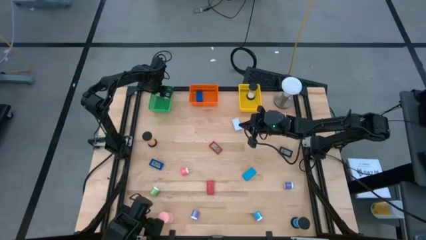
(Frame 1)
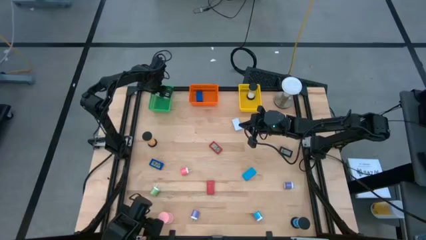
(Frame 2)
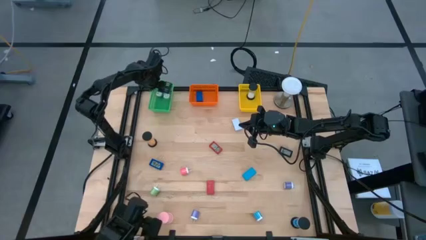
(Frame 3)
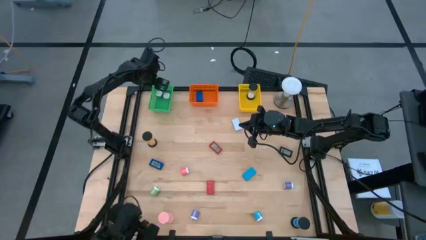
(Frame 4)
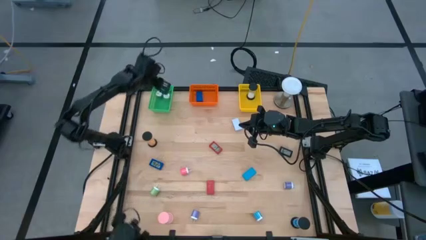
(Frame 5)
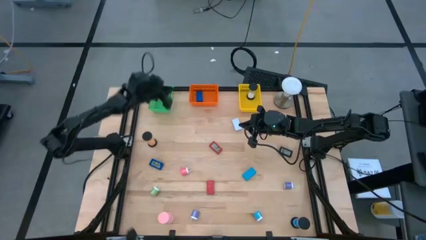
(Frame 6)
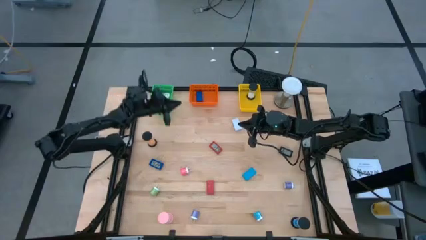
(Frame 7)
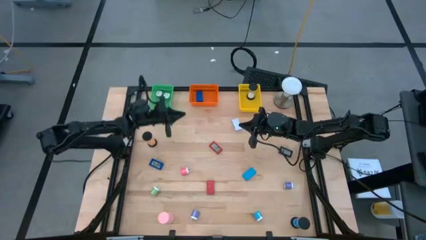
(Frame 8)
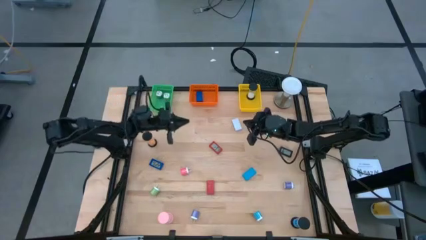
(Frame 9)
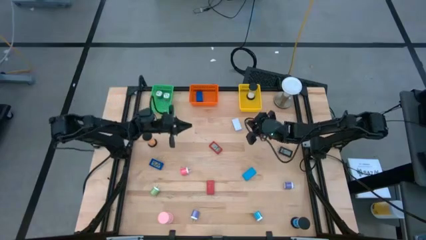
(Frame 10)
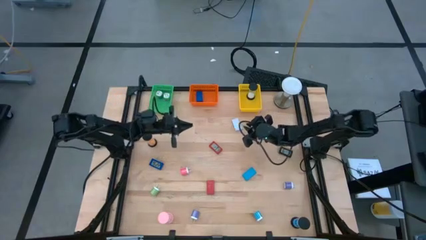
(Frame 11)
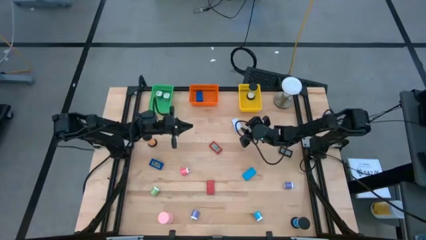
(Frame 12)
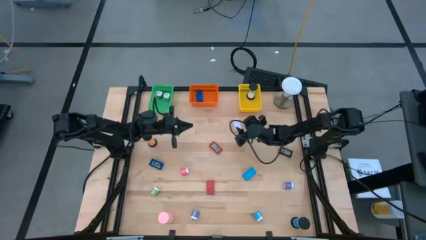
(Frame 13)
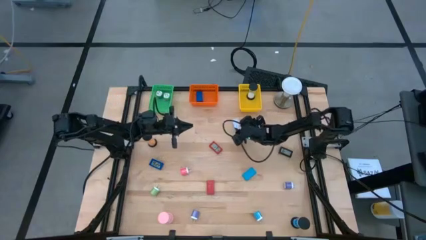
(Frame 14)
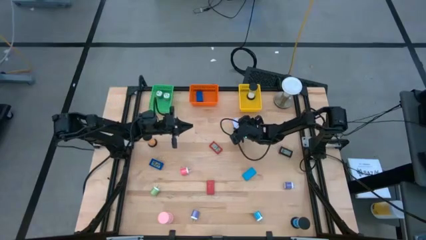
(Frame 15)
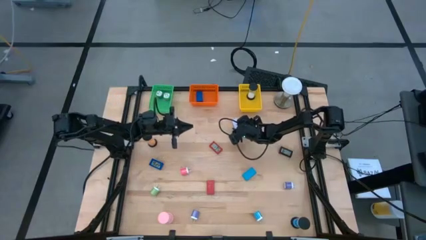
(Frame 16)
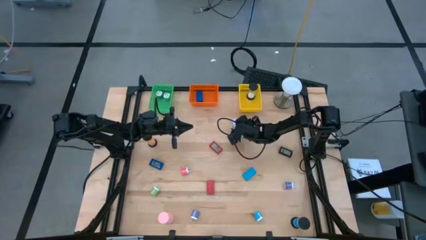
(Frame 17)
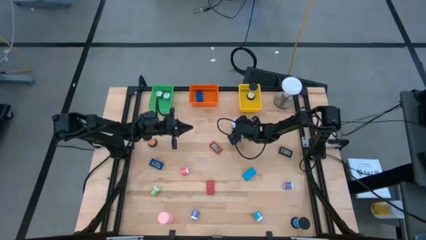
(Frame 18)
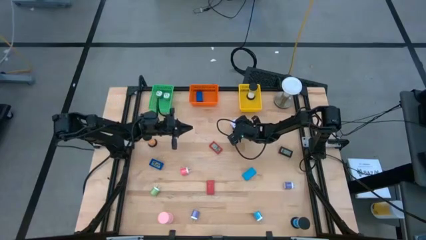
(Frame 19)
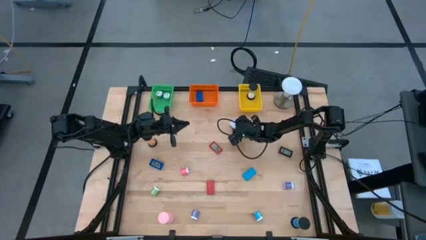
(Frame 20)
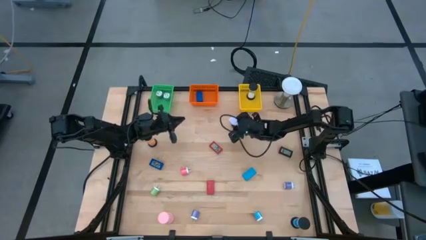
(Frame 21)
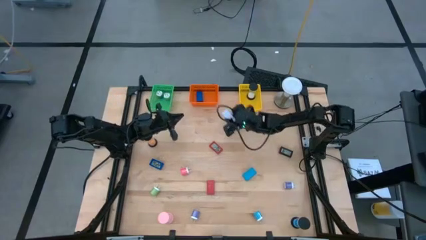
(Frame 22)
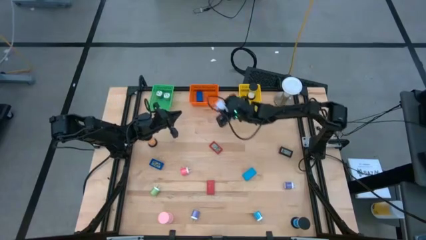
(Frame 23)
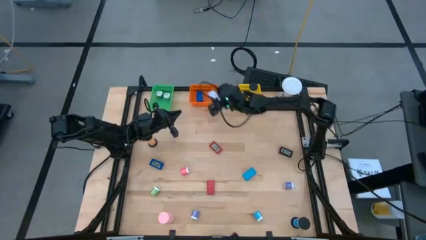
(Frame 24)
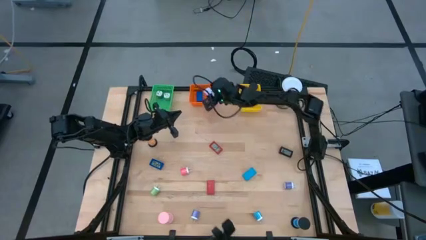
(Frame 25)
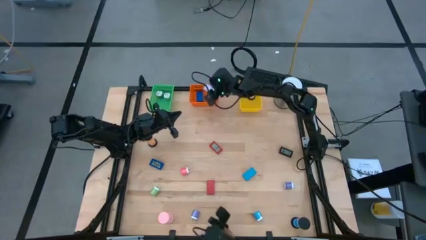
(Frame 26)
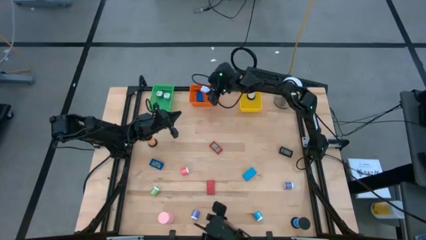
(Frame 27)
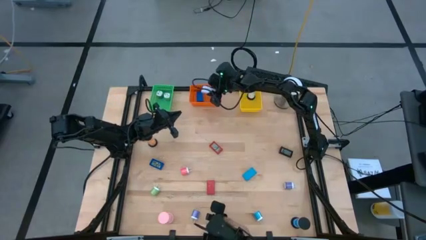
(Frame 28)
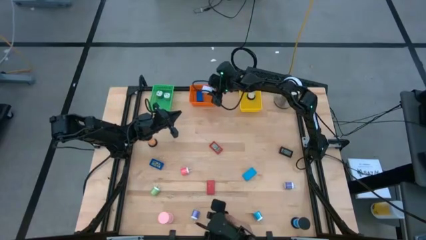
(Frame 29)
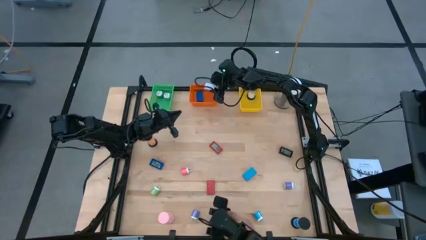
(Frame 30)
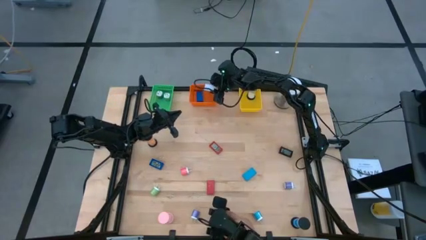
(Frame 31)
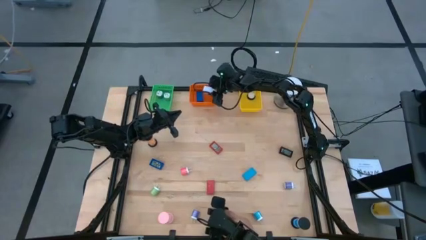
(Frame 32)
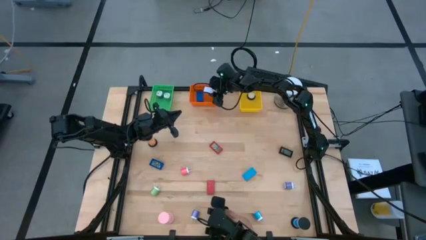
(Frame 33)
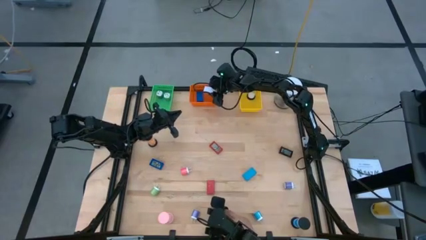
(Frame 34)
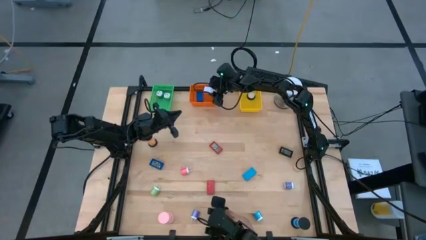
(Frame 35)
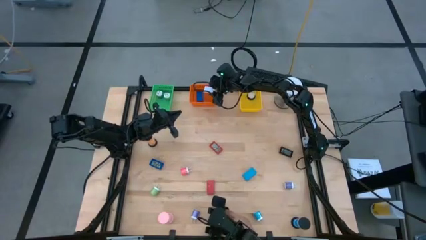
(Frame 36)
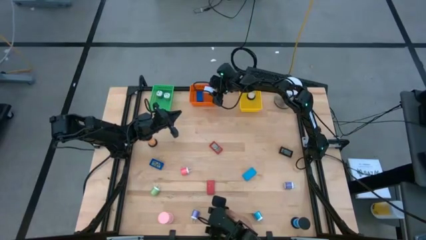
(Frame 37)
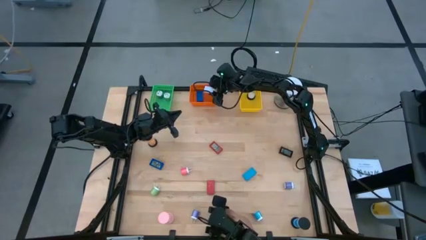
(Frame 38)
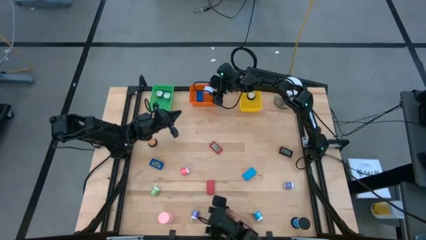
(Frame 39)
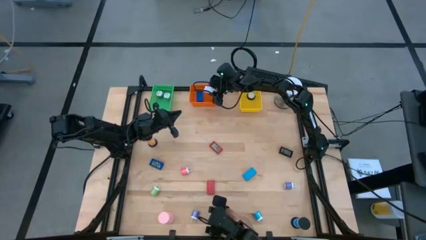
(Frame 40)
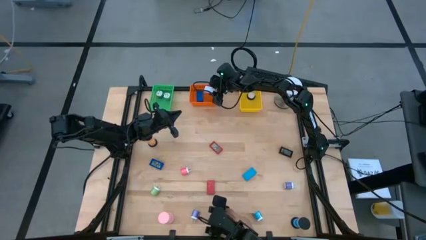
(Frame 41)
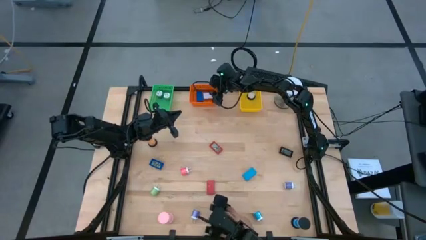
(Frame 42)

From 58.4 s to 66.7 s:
Task: Pick & Place Office items
Put the white digital clock into the orange bin

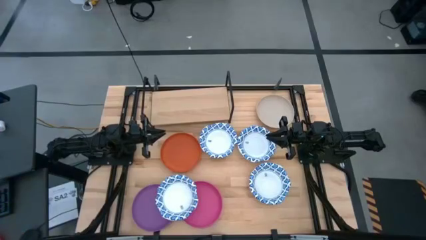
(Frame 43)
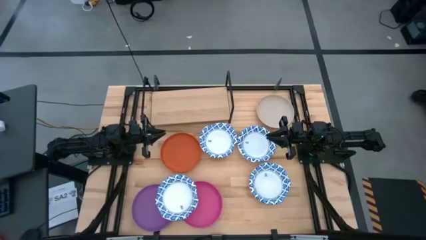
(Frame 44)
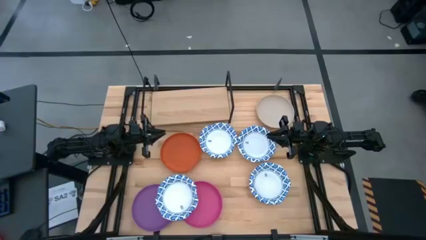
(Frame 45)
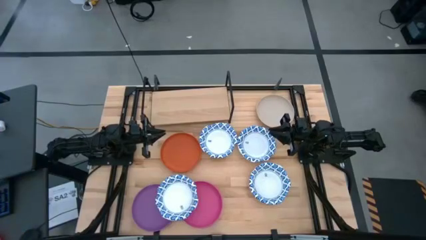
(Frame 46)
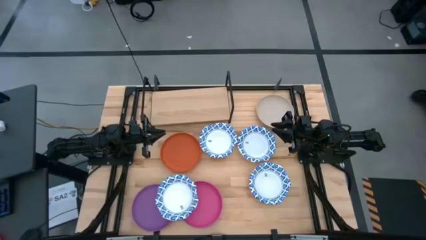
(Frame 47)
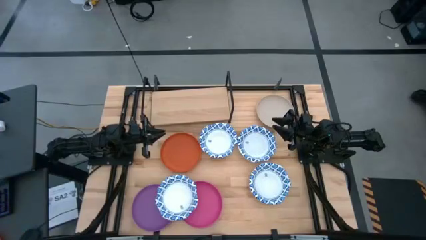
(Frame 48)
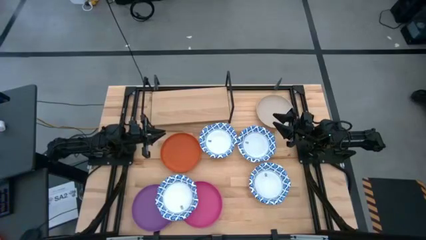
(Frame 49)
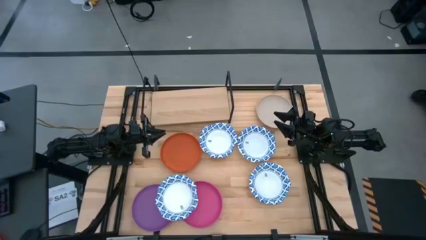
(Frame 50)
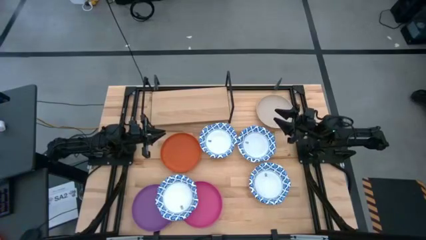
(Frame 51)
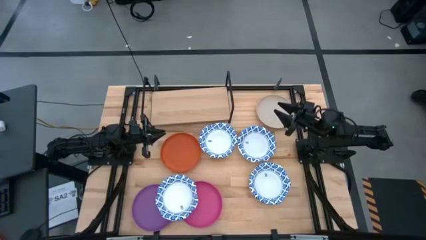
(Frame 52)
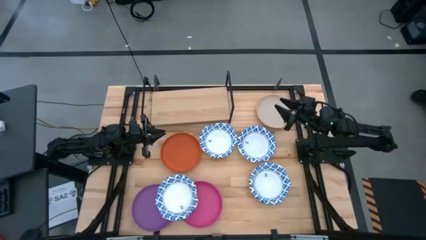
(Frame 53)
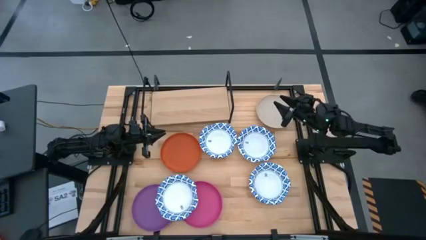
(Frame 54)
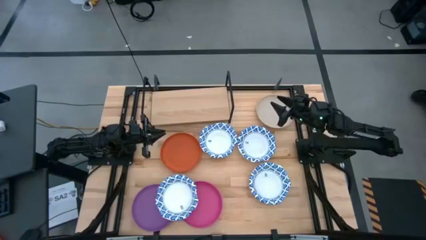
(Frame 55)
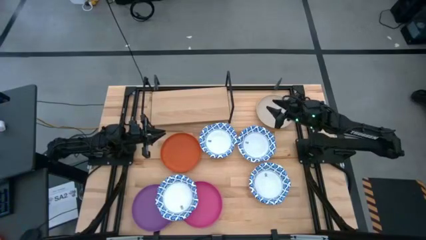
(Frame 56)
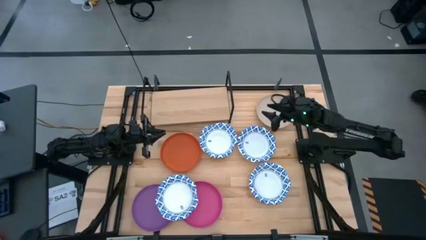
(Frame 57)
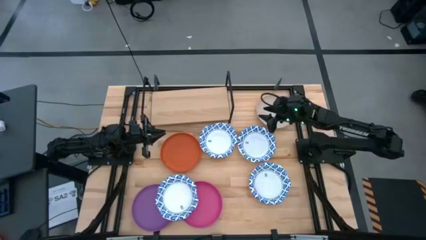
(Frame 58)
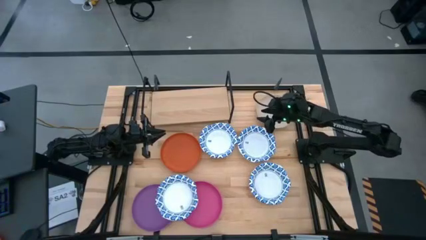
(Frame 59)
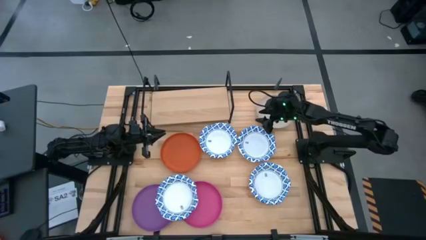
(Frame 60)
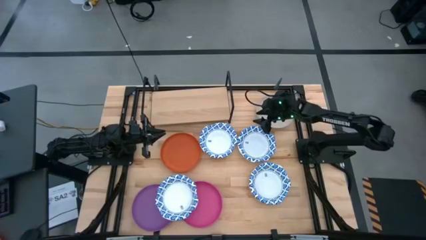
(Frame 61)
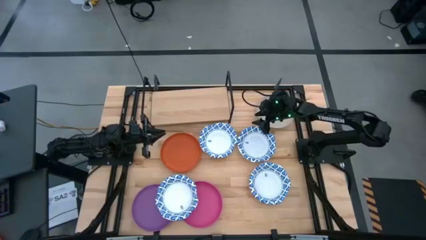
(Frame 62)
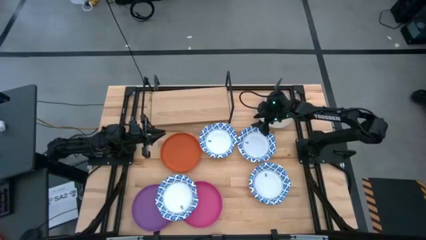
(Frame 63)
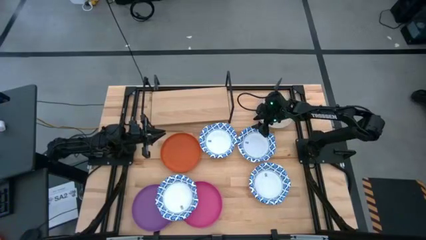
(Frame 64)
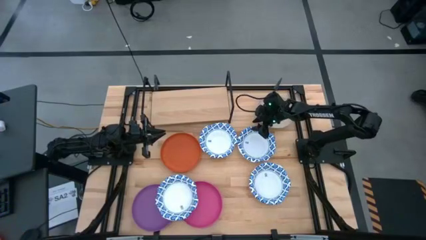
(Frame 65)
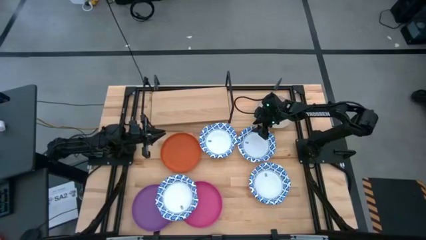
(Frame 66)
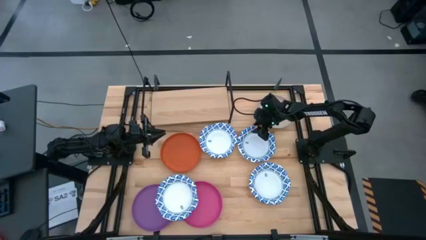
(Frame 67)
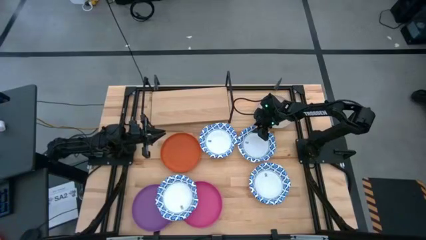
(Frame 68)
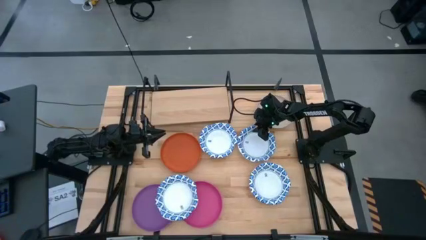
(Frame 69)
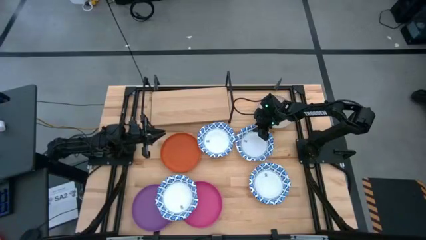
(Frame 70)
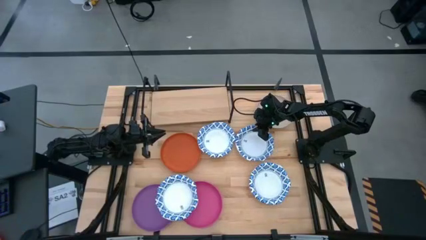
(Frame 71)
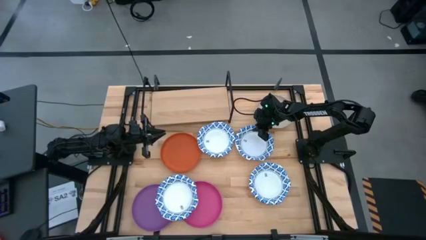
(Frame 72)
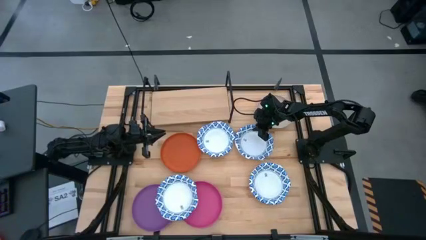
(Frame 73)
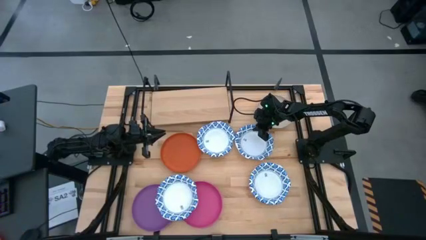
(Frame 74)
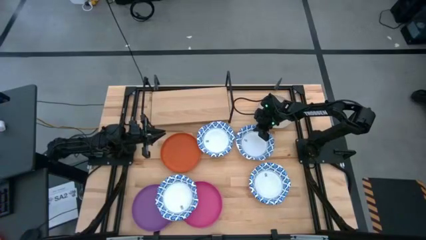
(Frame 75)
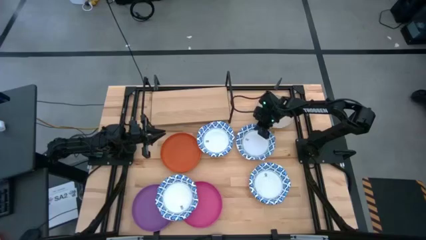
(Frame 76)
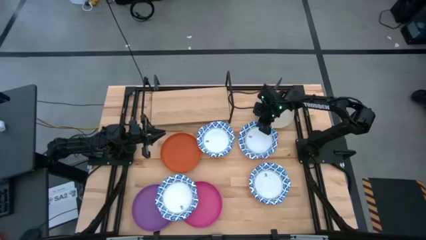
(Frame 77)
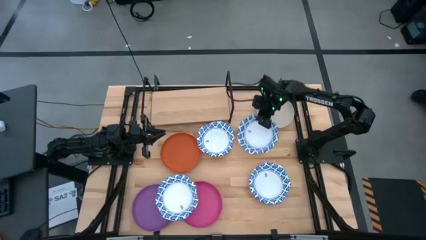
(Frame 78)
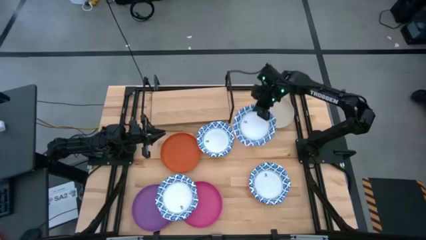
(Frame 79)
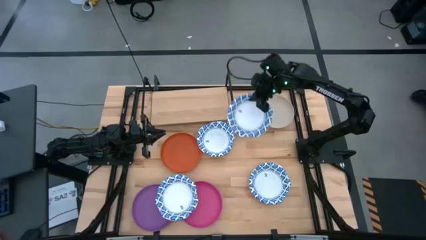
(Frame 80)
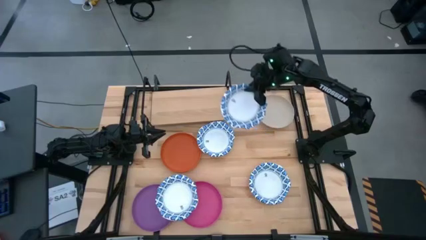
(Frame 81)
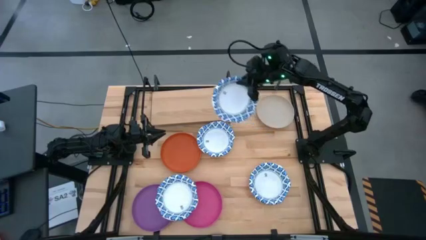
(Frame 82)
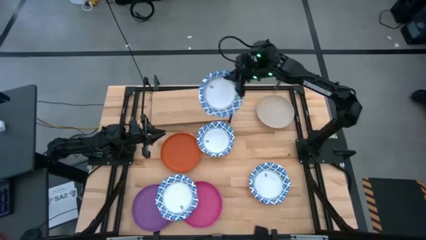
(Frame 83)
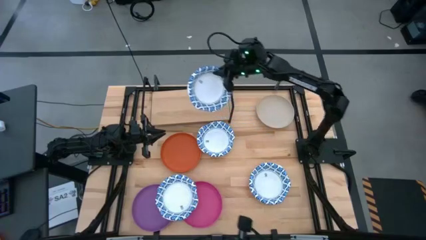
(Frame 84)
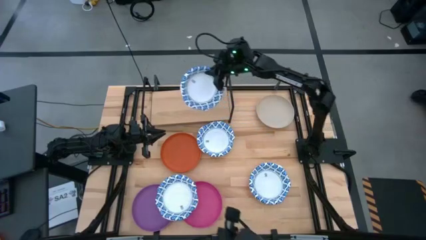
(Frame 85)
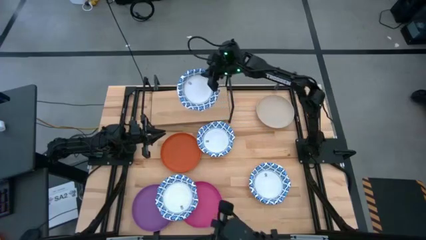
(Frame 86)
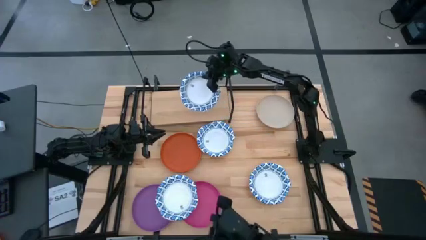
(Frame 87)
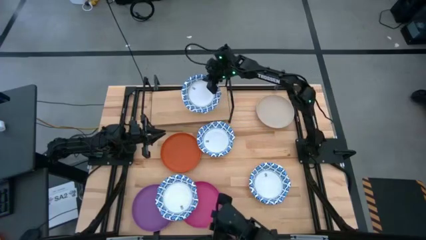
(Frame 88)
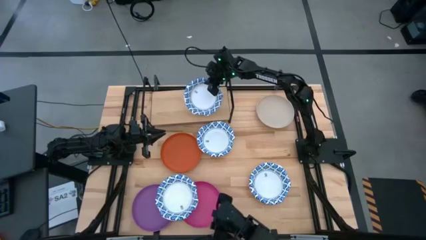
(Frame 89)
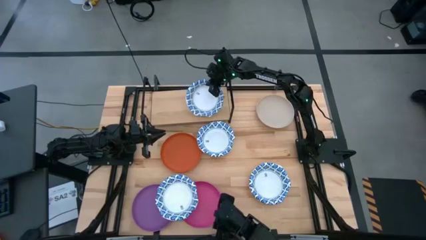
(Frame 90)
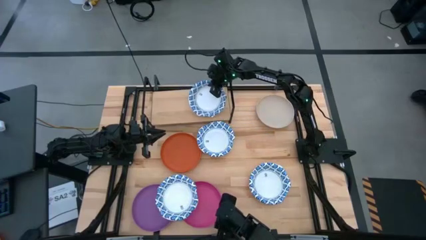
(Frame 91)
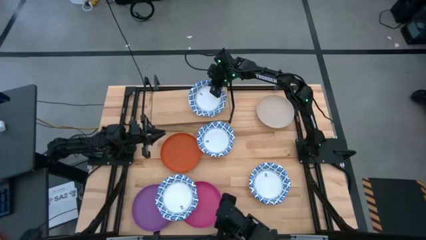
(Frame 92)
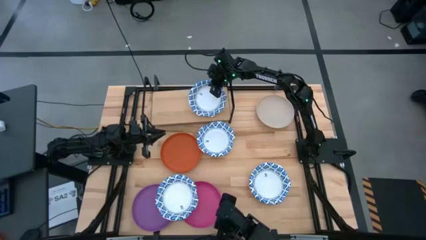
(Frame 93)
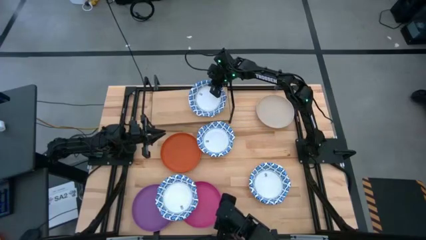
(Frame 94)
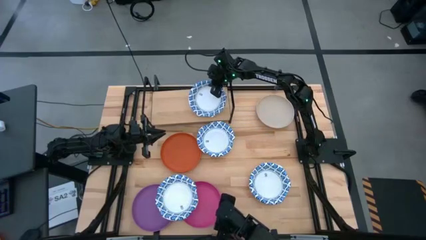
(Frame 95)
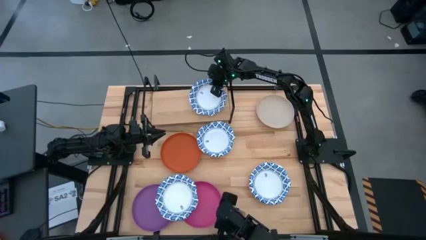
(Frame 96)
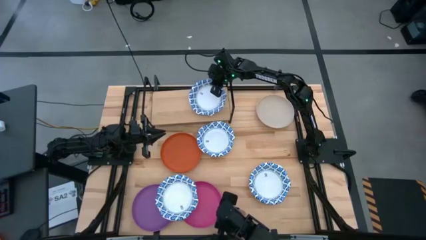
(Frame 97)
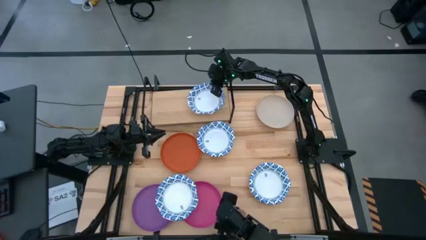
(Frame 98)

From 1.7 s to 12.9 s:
Task: Place and stack plates onto a shelf
Put the white bowl on the shelf
